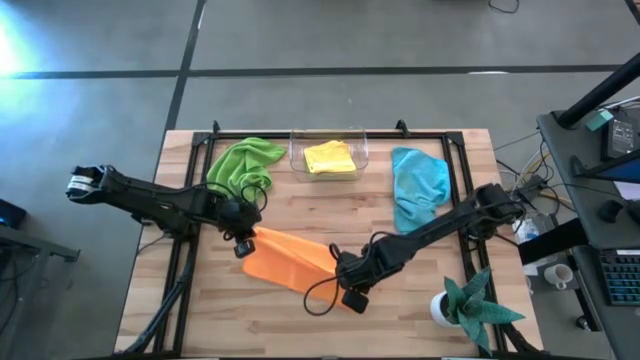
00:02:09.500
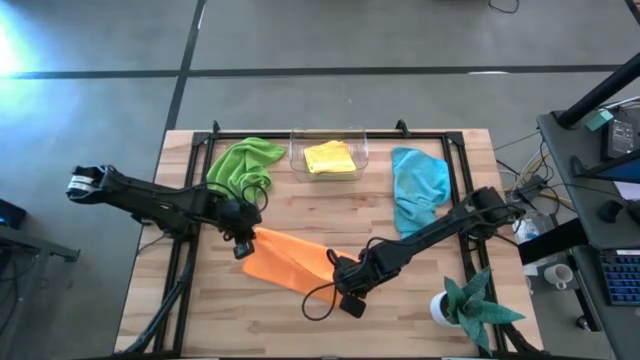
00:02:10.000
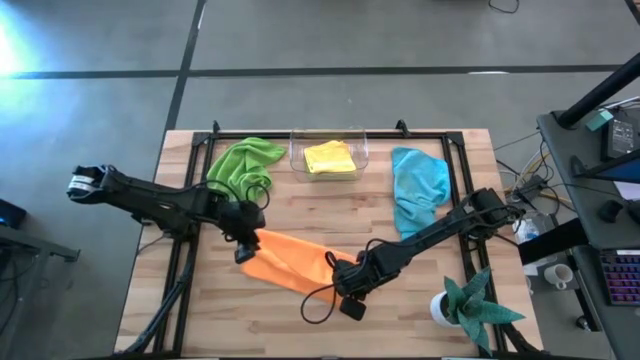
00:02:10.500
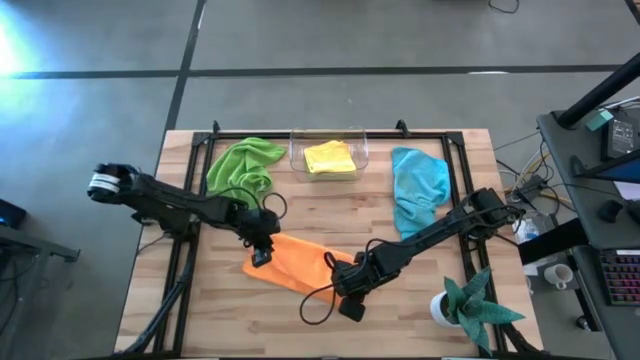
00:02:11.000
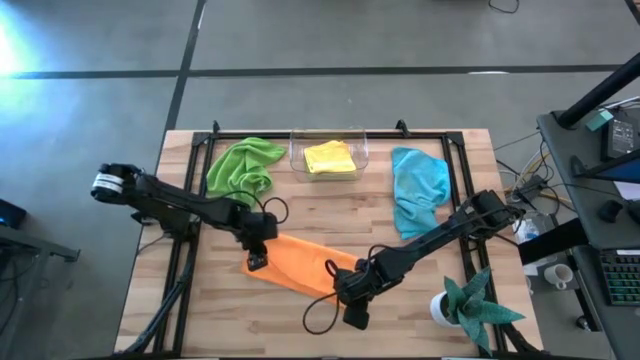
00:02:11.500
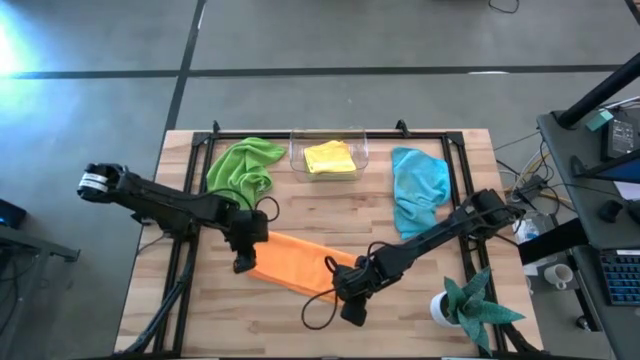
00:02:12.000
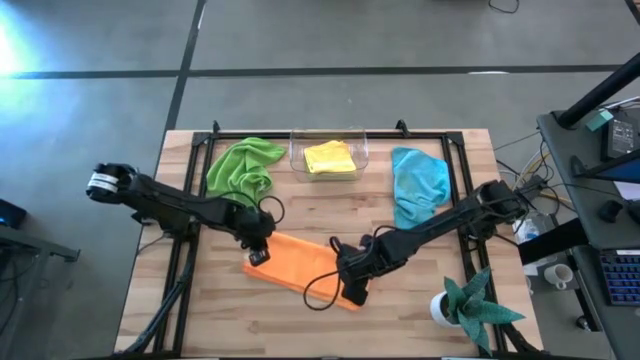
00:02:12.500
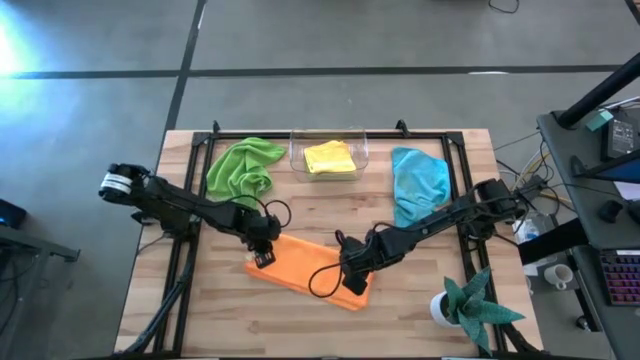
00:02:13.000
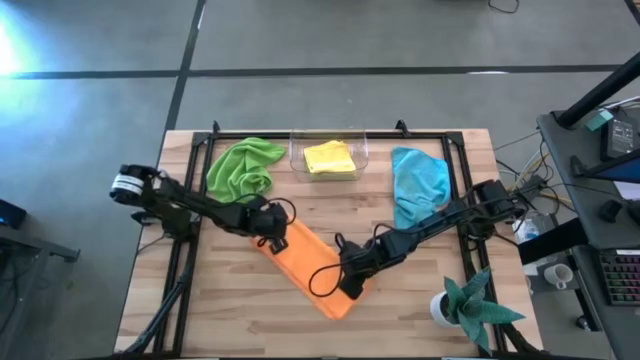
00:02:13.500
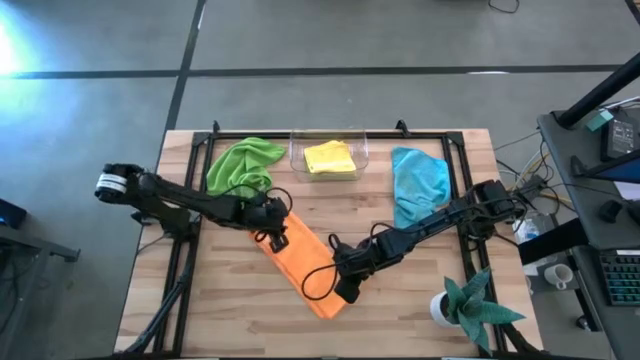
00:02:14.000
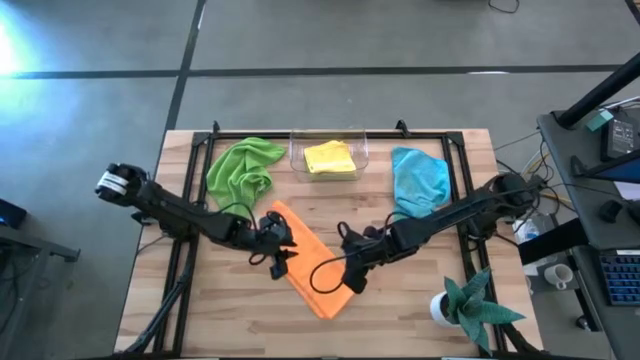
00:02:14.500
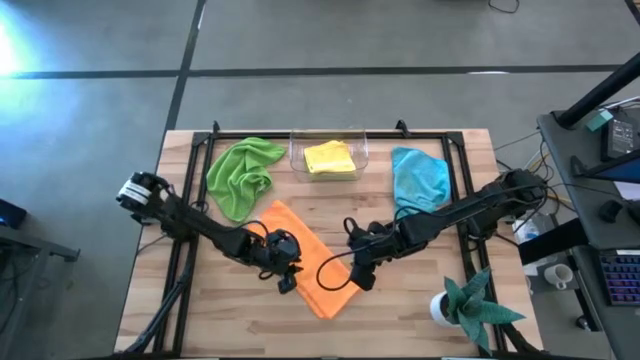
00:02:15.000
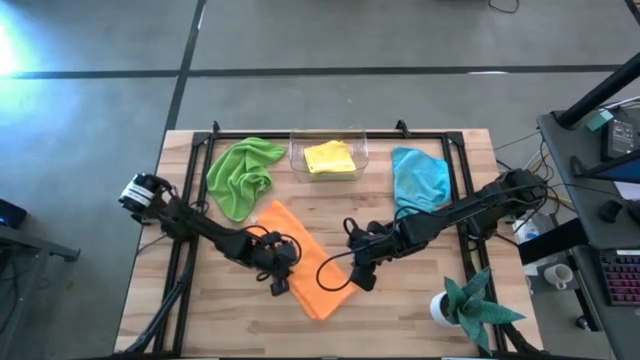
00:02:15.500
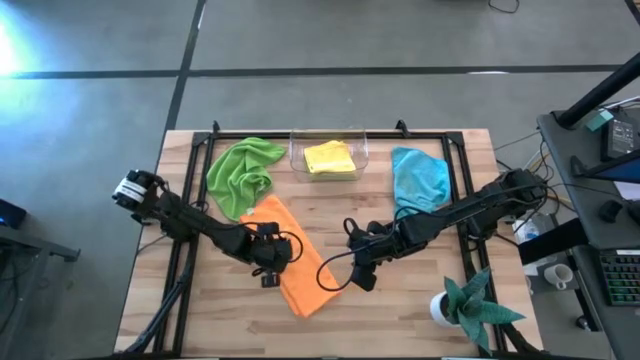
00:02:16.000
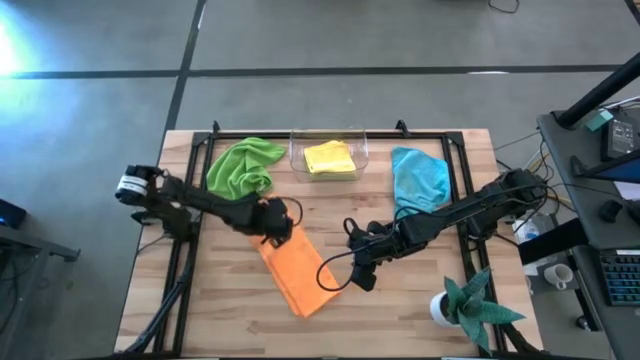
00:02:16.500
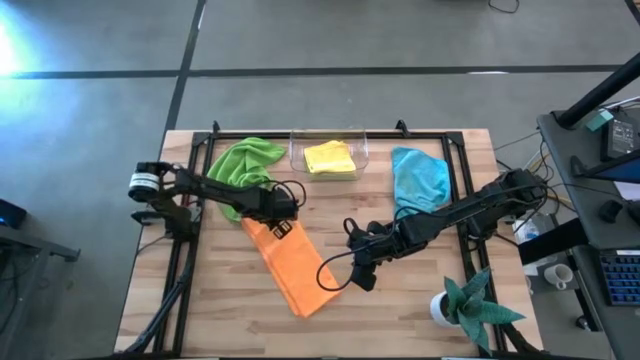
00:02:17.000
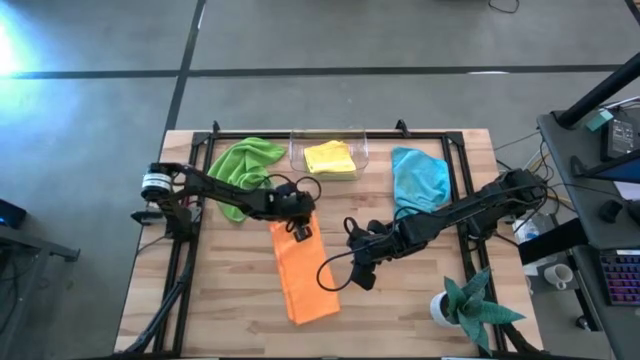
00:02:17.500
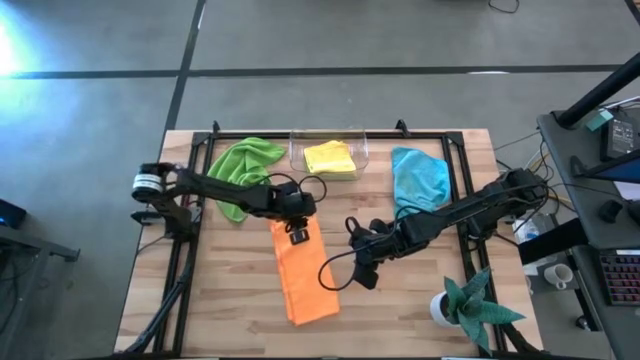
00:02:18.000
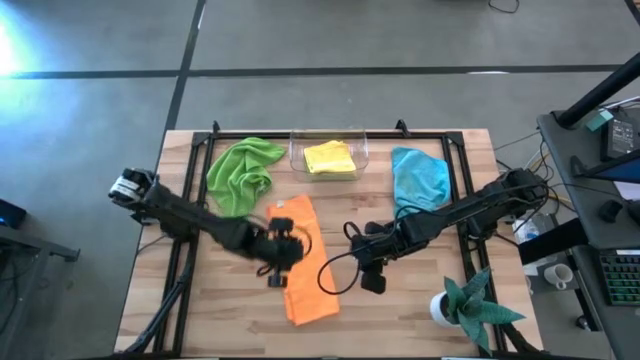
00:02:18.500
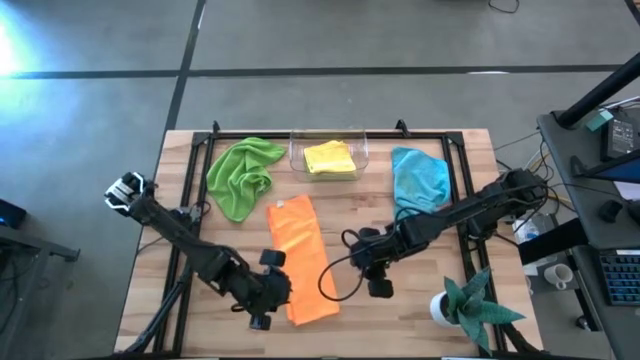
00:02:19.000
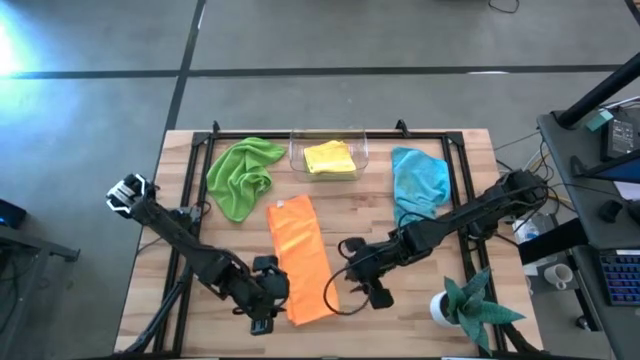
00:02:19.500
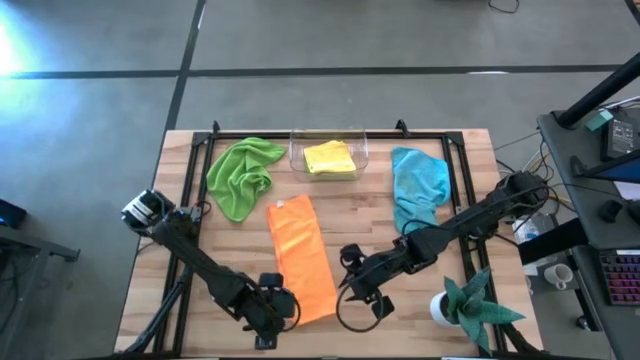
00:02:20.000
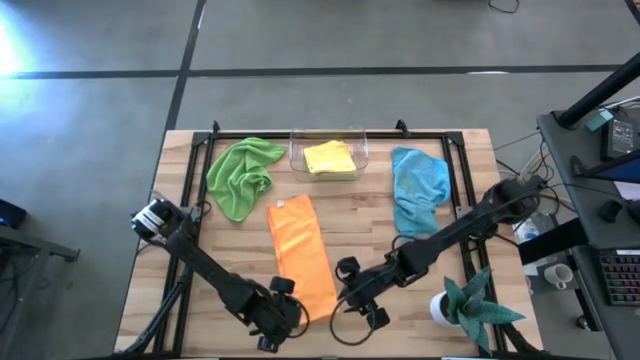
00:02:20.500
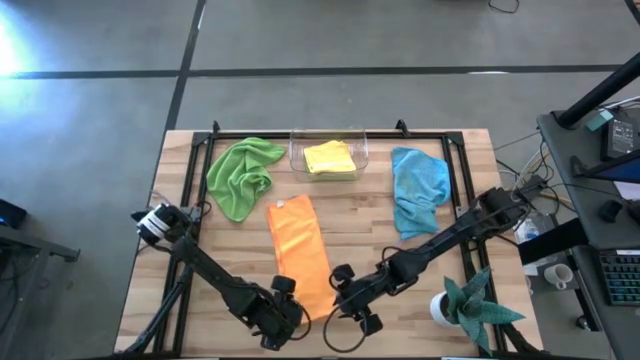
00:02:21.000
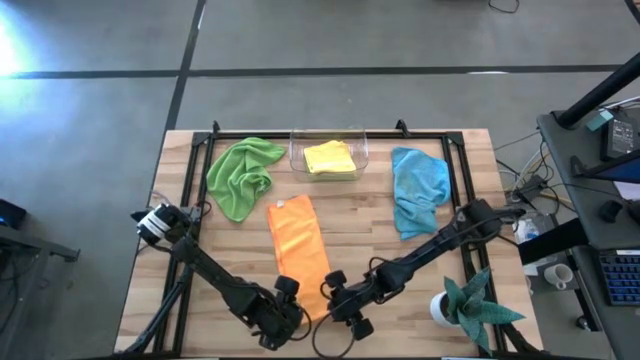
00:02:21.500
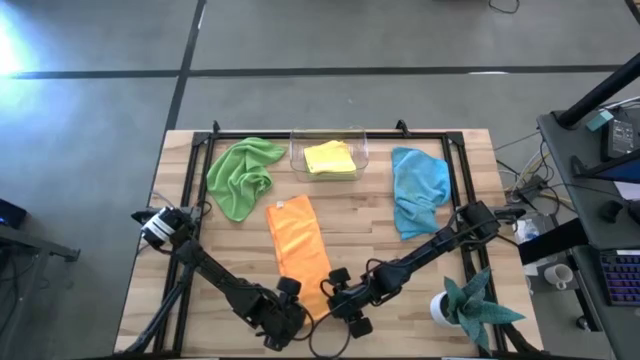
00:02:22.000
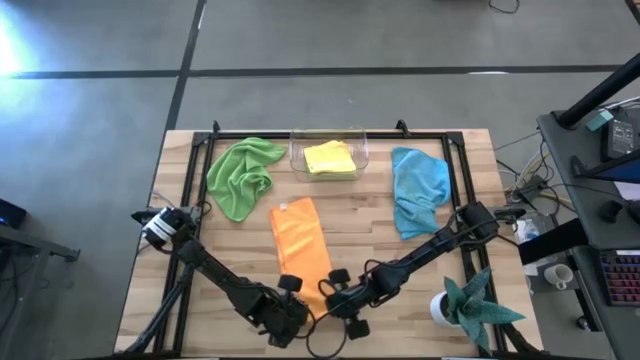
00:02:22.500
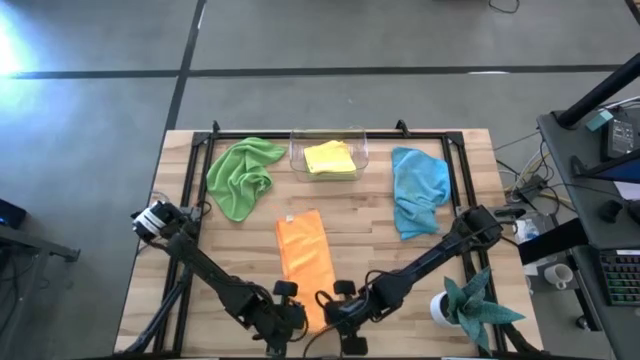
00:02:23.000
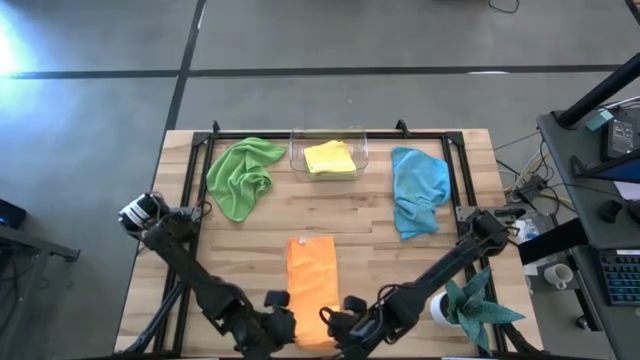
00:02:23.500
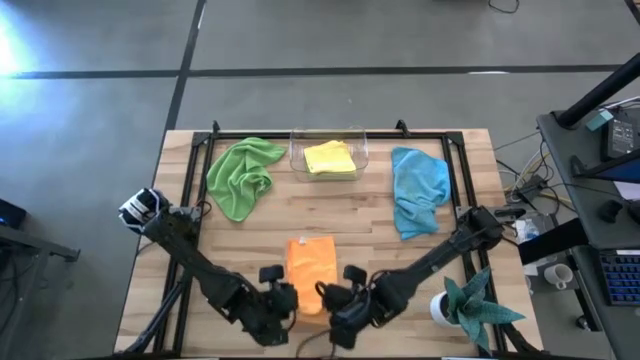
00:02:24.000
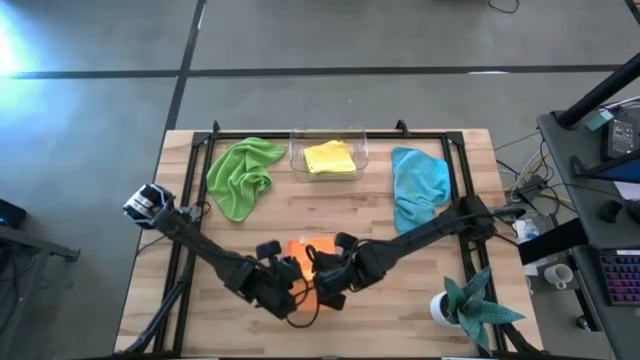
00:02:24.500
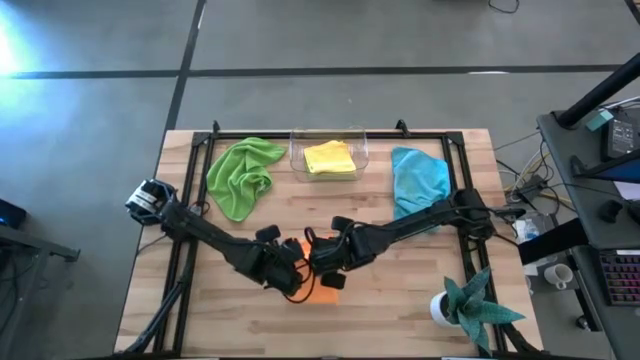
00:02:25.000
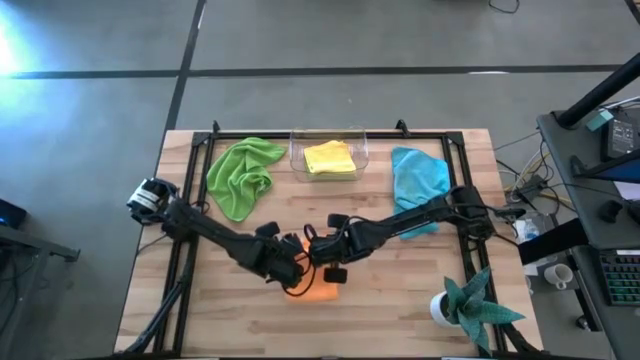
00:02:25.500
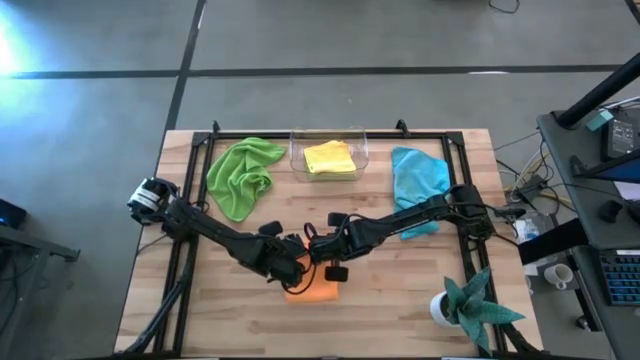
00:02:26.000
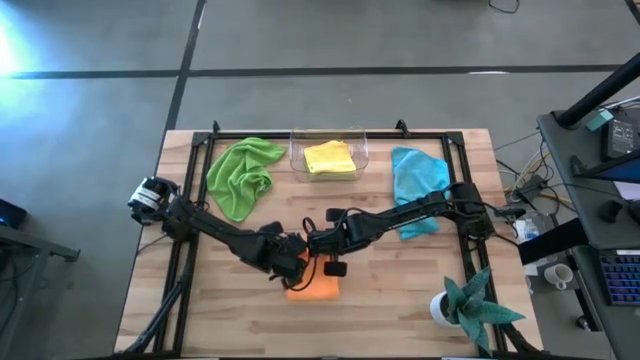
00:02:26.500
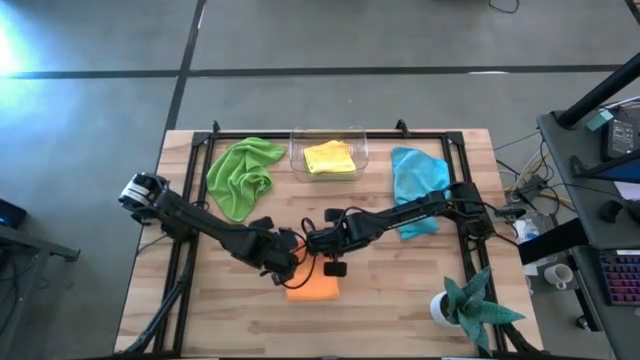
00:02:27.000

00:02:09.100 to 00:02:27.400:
Task: Fold microfiber towels
Fold the orange microfiber towel into the transparent bin

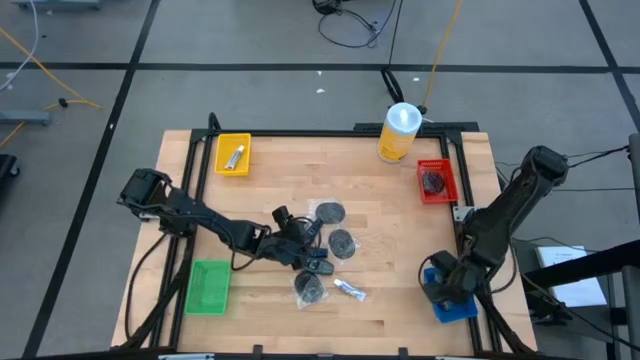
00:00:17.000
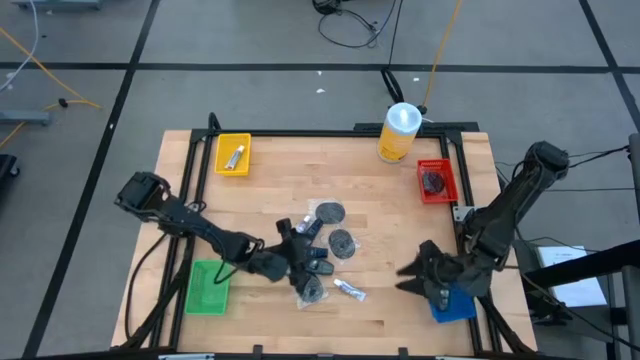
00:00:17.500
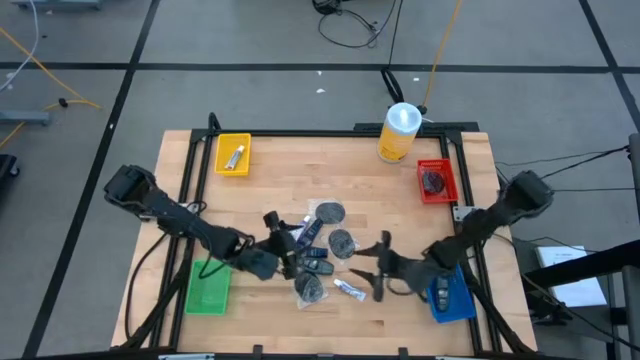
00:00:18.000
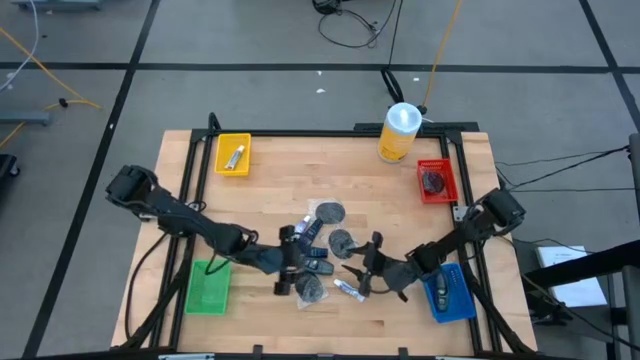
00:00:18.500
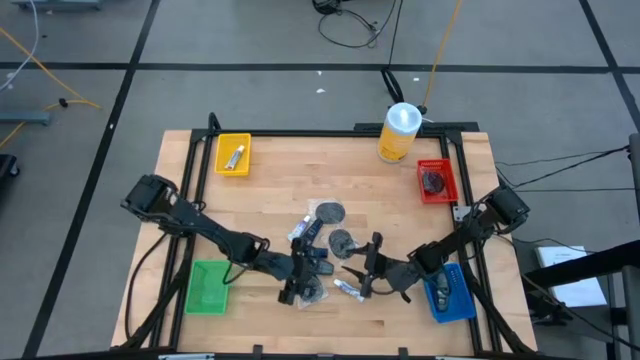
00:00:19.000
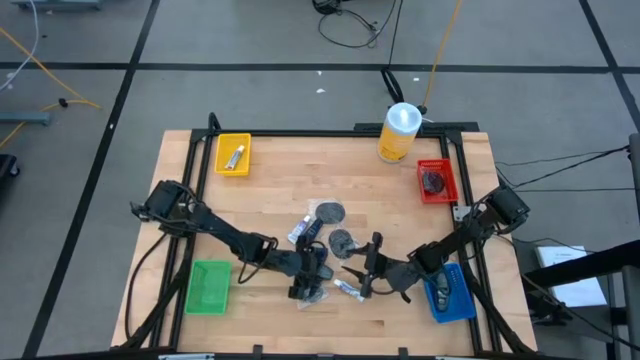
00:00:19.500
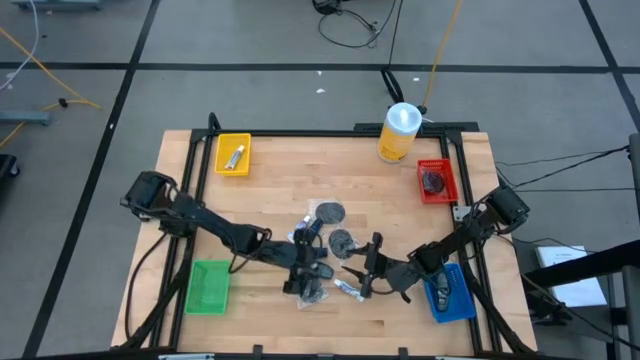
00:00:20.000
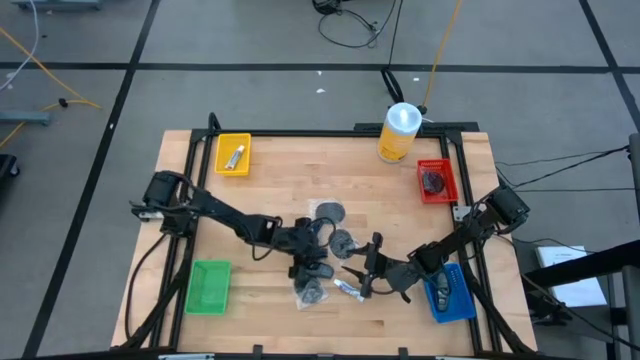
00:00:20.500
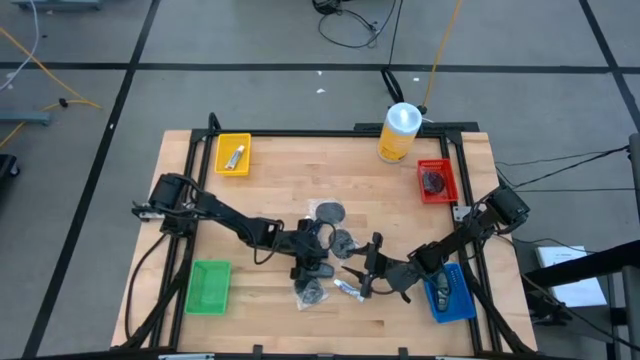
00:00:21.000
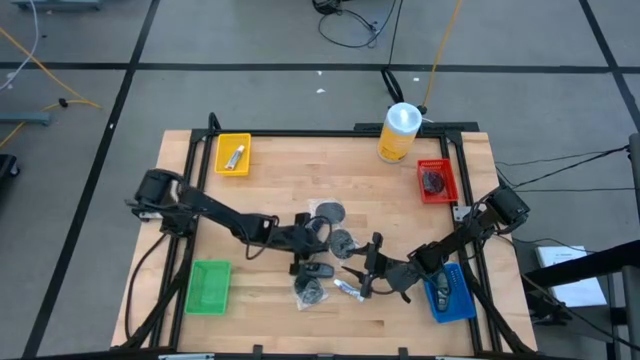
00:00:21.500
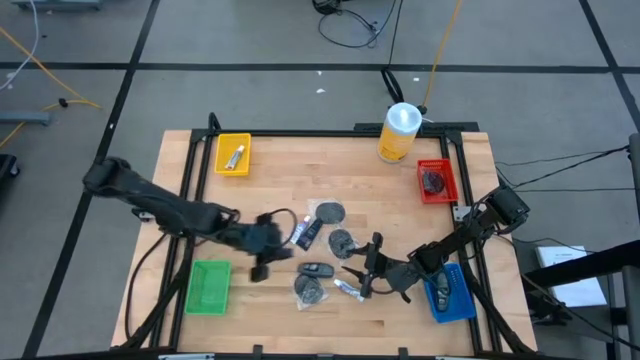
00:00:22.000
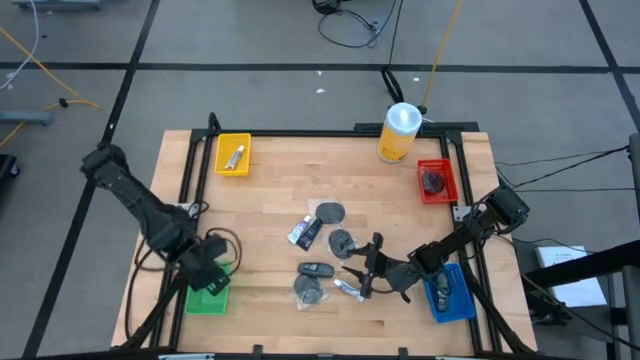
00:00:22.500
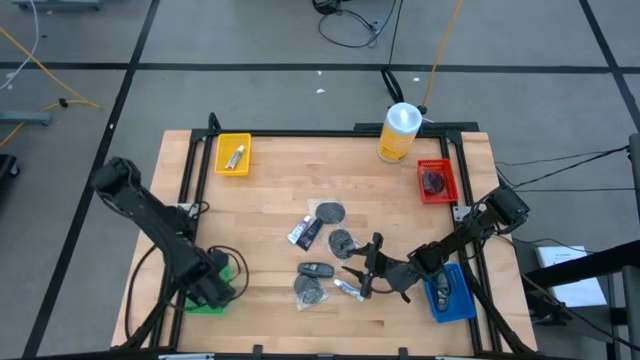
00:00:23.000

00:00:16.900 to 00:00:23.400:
Task: Pick & Place Travel size toiletries
Put the dark blue shave cream into the green bin
